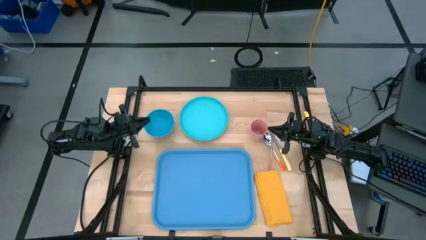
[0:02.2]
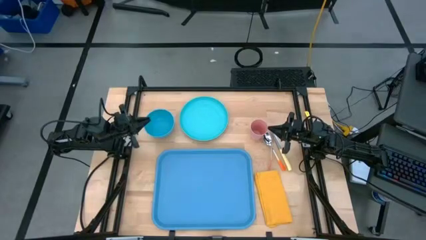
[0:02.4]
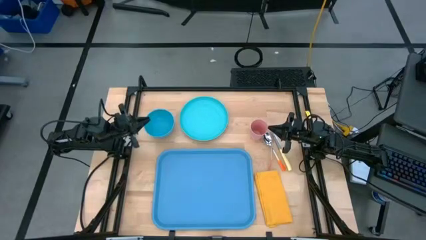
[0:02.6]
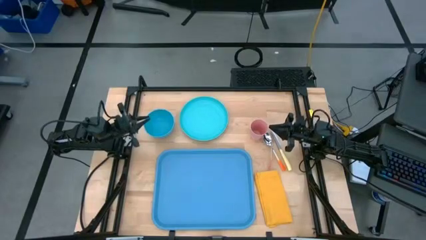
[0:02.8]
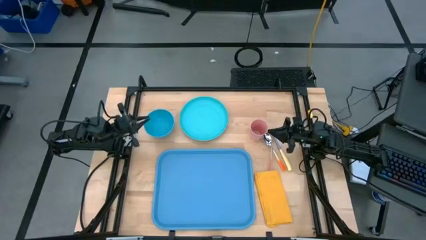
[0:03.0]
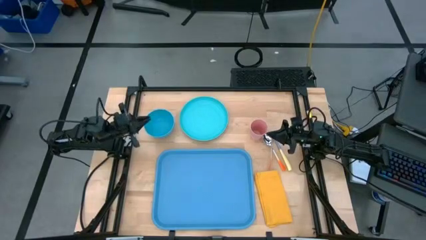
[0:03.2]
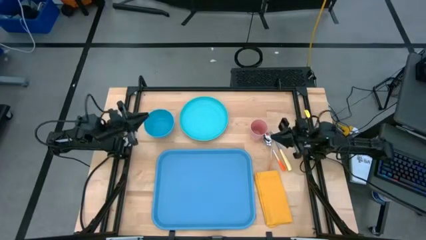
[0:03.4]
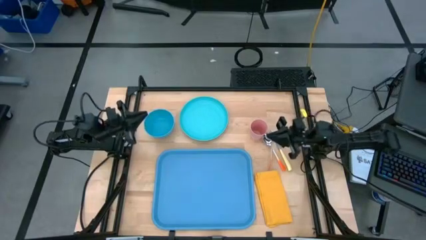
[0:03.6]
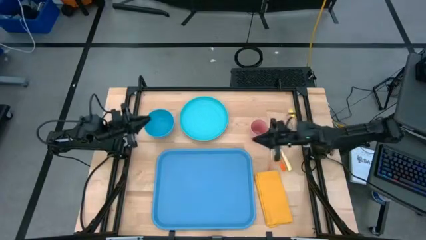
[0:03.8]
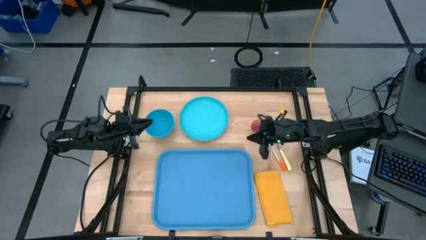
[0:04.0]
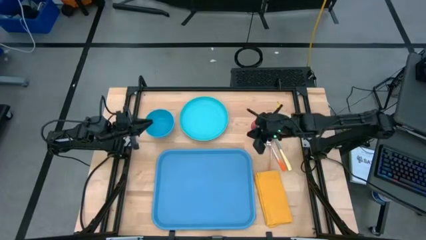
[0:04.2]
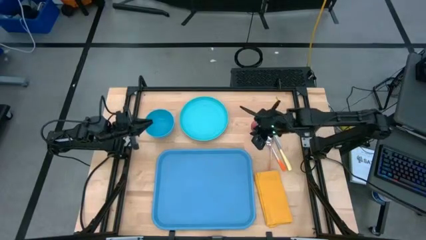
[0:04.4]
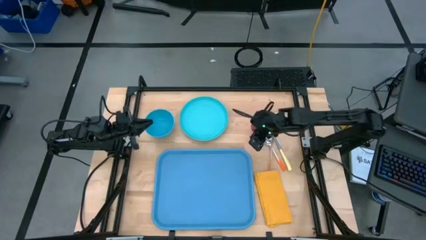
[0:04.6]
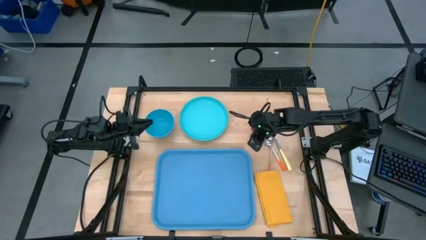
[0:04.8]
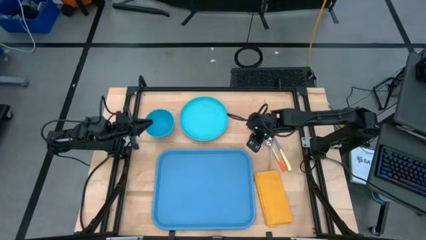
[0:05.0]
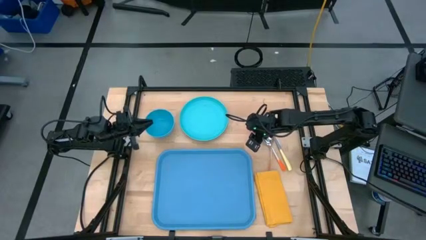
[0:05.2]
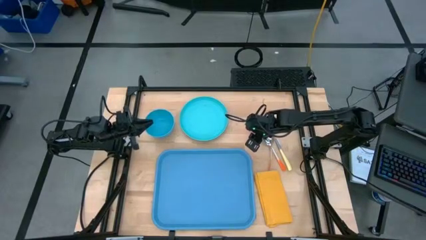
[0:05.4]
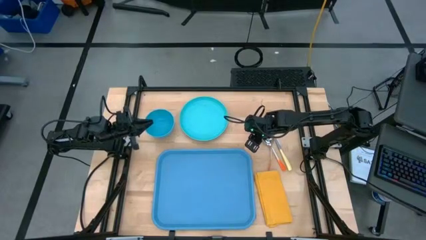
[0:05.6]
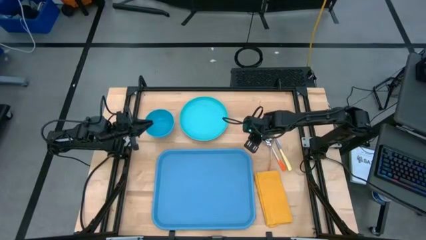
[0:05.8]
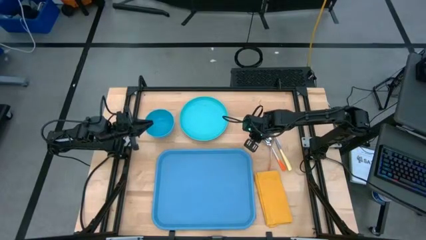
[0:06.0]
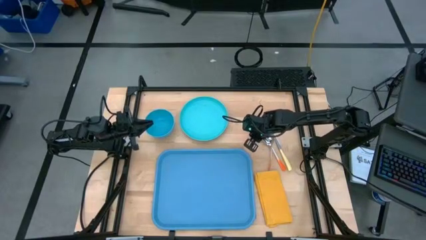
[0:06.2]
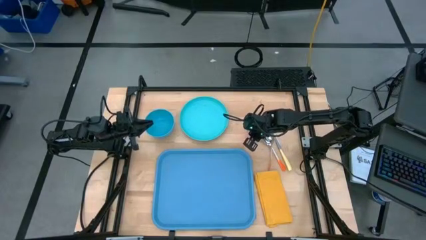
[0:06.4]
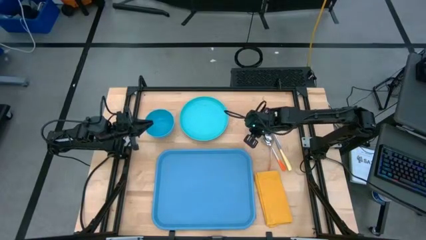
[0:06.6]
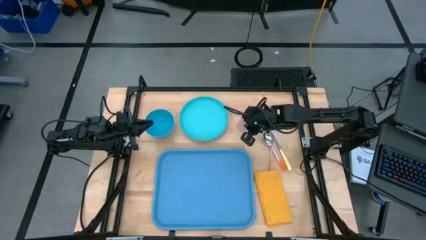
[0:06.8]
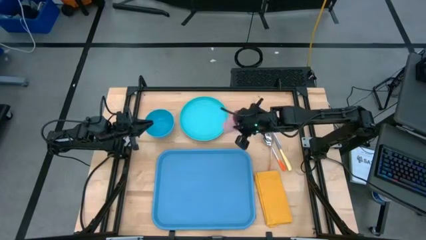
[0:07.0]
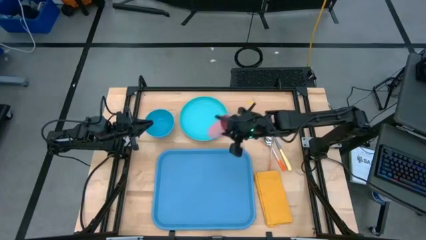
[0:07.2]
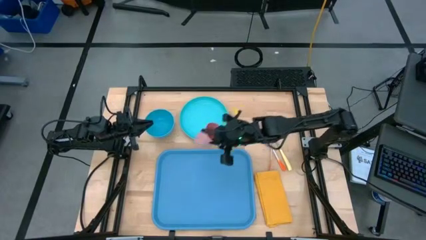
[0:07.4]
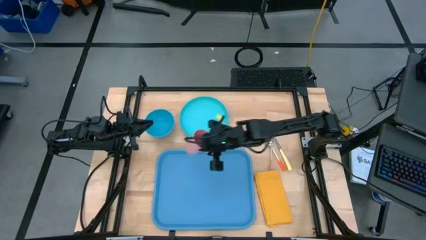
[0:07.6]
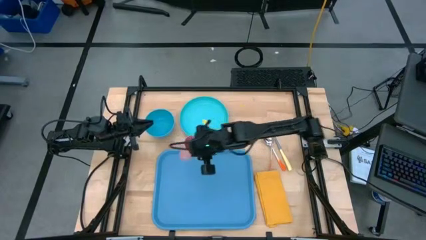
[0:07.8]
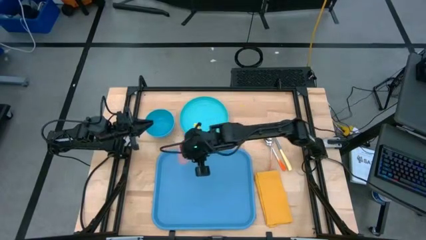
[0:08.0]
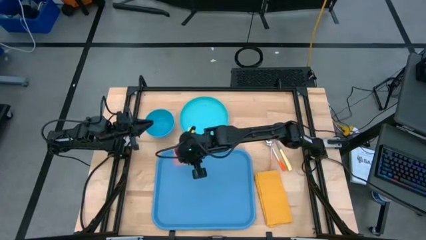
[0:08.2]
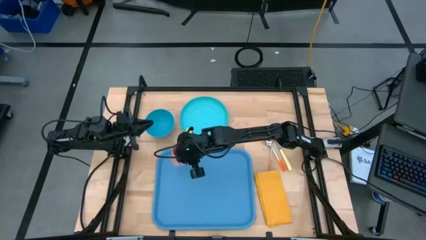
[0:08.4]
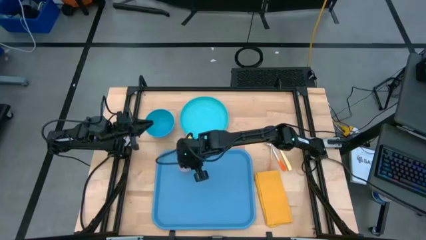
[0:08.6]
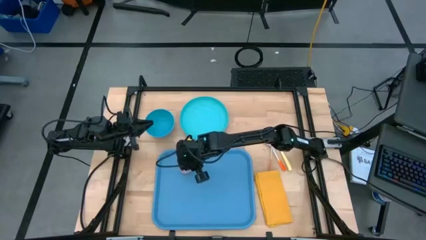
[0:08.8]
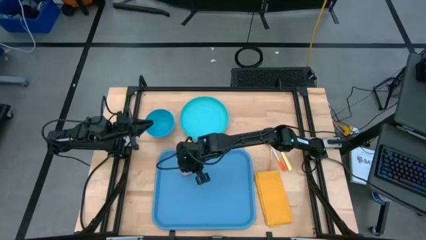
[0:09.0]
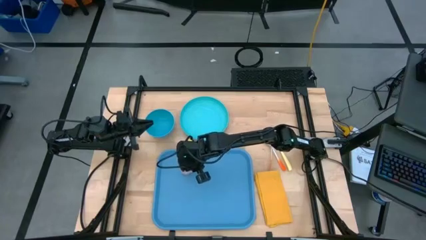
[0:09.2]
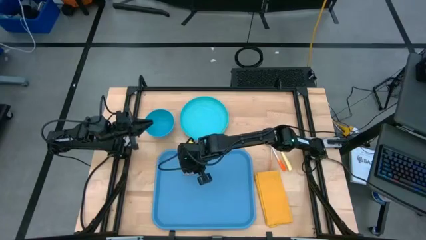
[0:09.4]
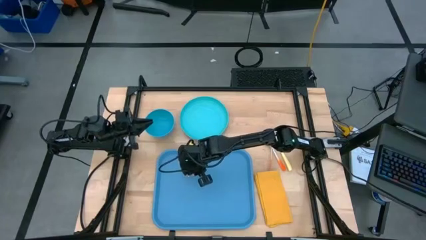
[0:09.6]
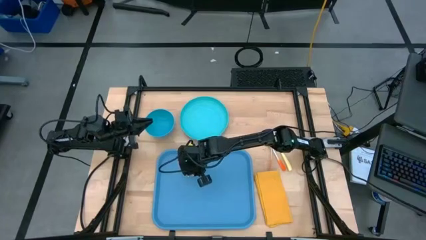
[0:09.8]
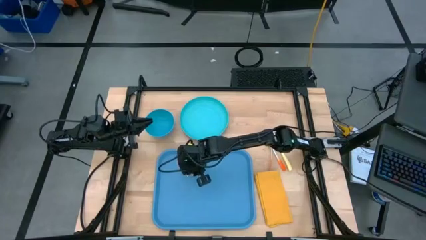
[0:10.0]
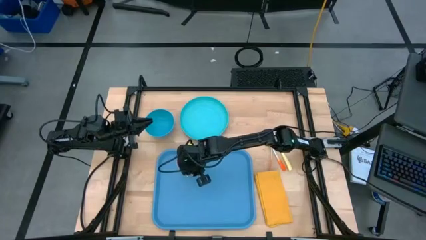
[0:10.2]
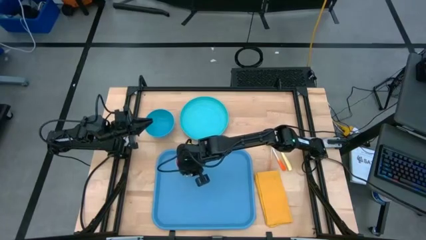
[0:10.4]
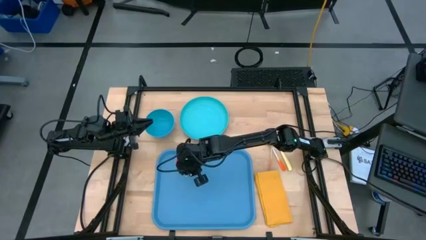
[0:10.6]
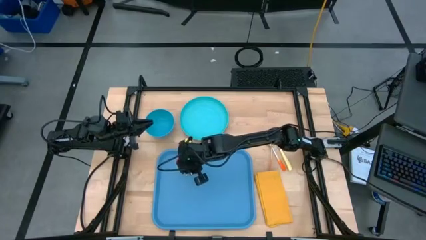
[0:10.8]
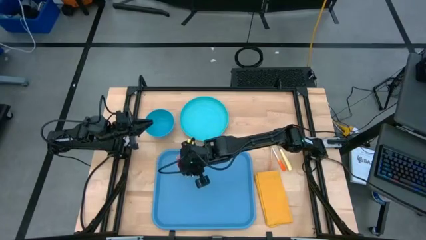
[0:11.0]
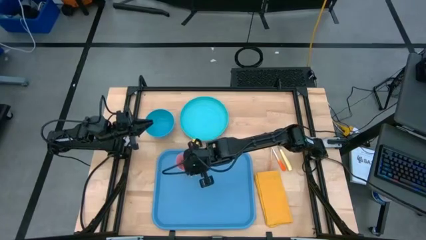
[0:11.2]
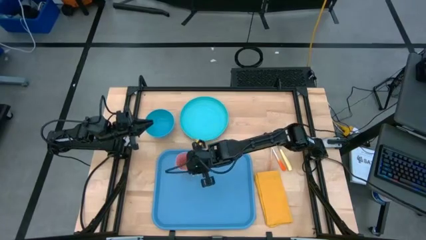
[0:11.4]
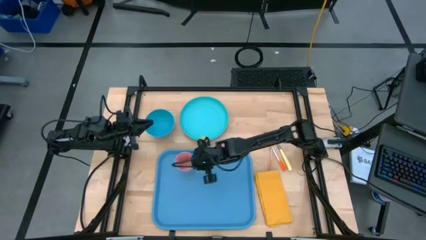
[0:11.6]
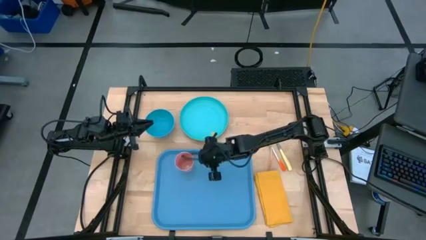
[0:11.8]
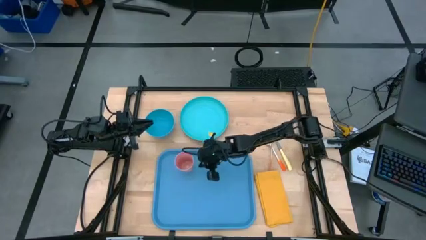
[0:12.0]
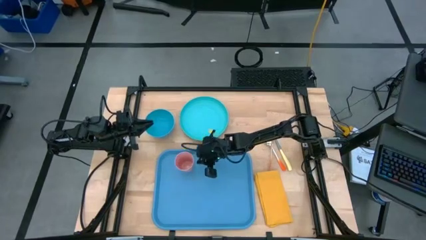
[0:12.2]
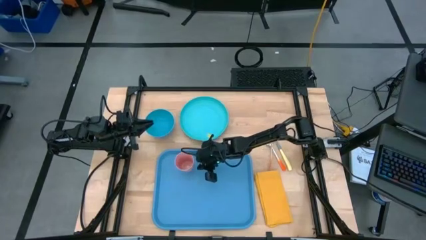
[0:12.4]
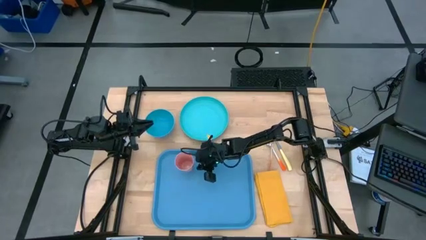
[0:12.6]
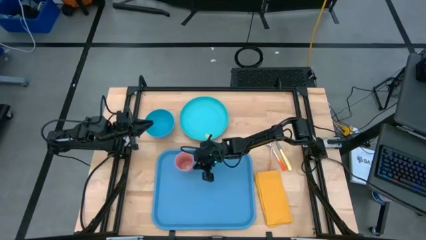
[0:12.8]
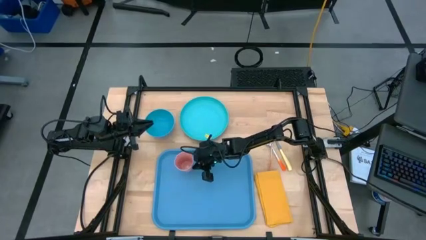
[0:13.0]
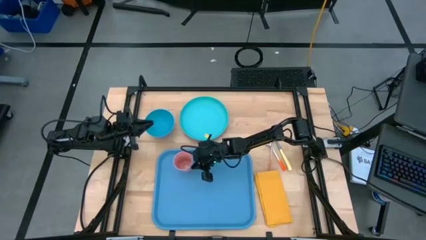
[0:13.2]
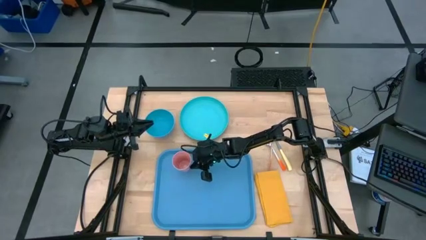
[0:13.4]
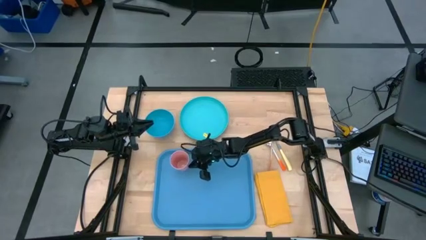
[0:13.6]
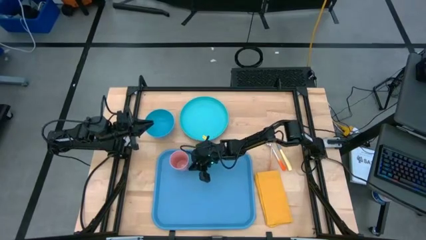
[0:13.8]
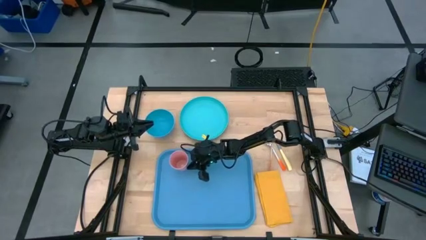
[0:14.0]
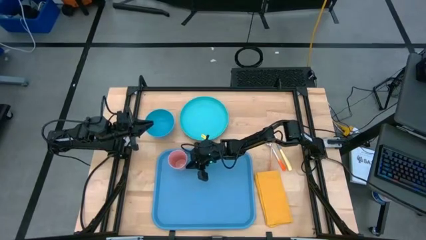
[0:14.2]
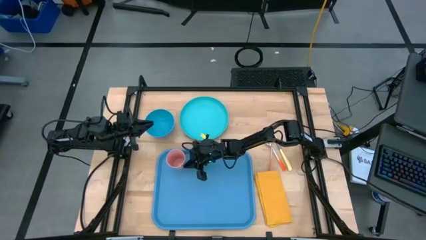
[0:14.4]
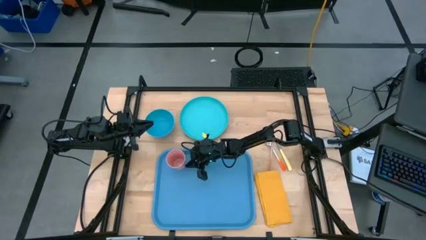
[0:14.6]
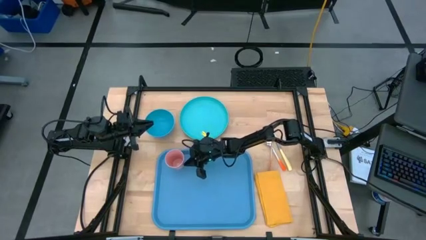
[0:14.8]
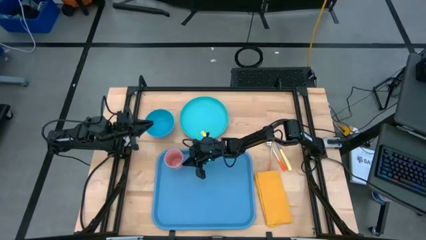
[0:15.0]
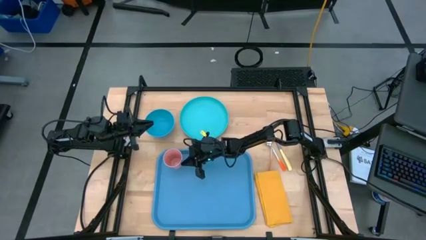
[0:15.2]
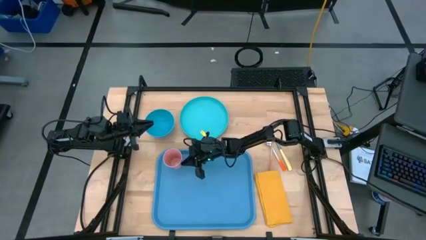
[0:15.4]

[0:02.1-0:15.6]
Task: Set up tray
Put the cup on the serving tray
